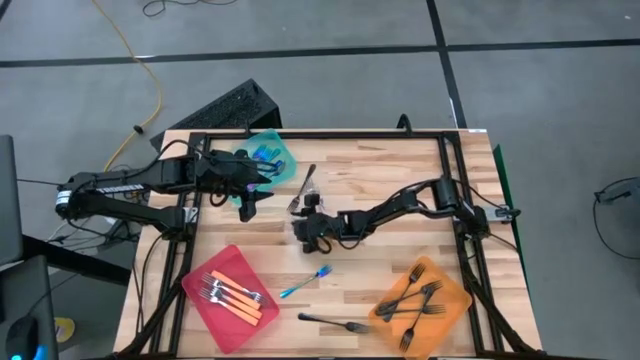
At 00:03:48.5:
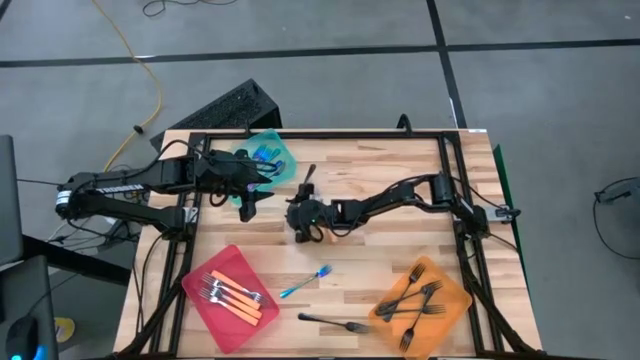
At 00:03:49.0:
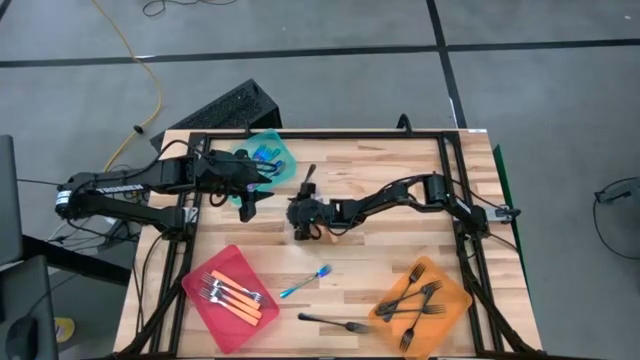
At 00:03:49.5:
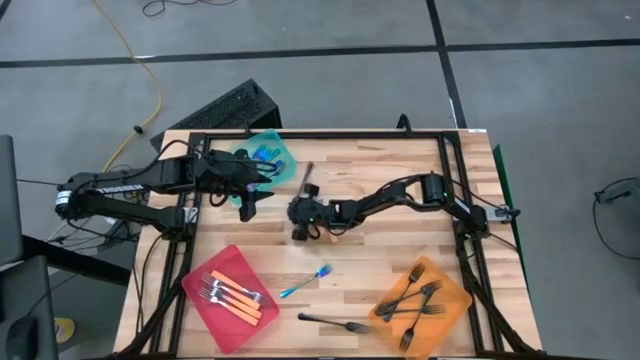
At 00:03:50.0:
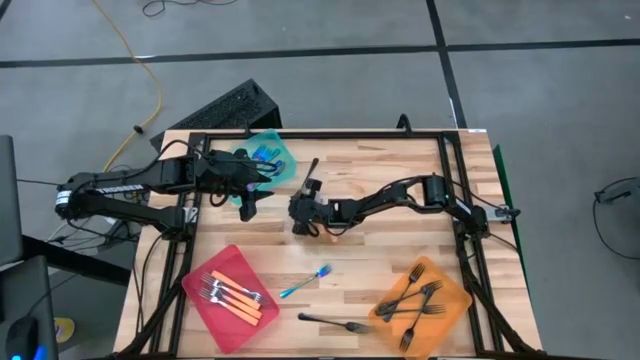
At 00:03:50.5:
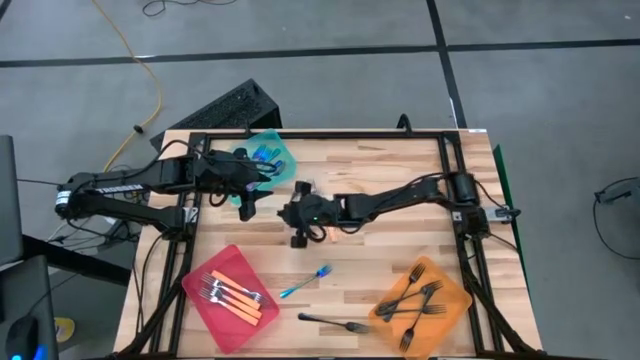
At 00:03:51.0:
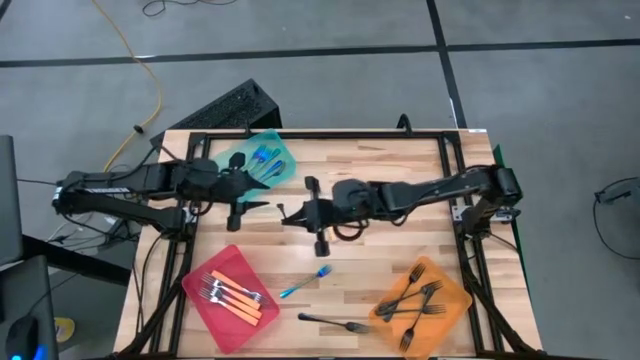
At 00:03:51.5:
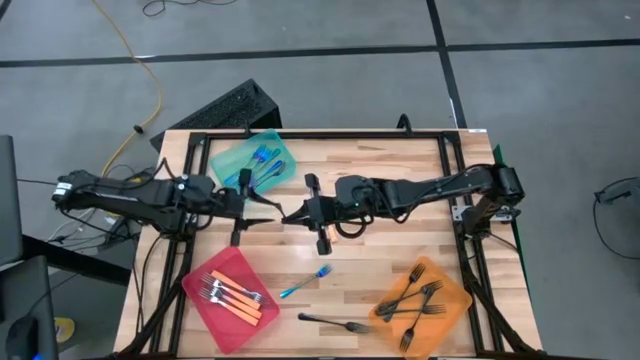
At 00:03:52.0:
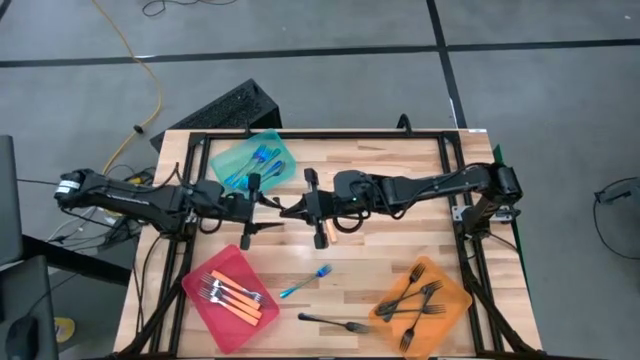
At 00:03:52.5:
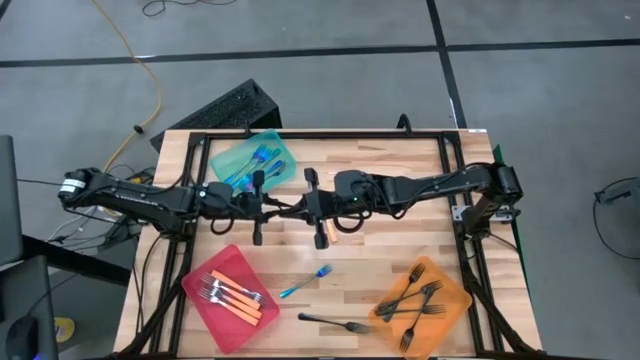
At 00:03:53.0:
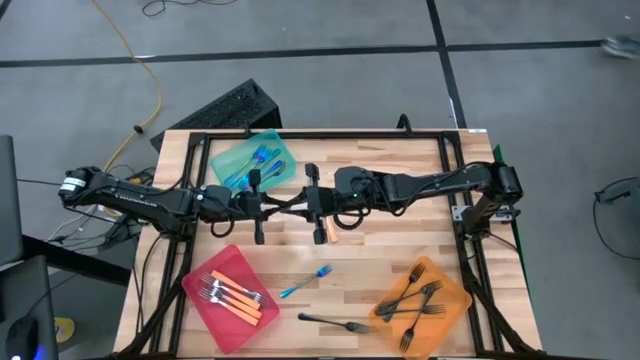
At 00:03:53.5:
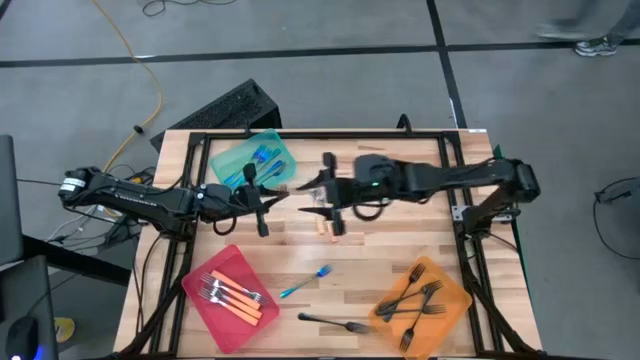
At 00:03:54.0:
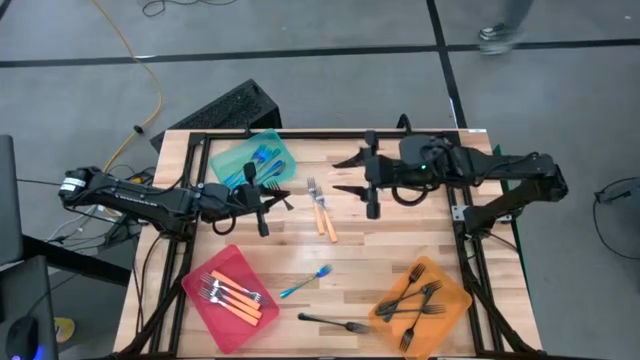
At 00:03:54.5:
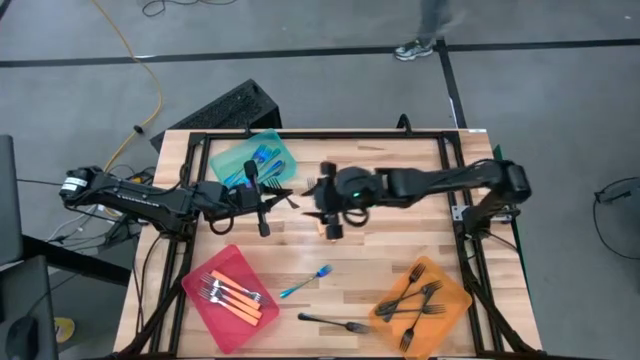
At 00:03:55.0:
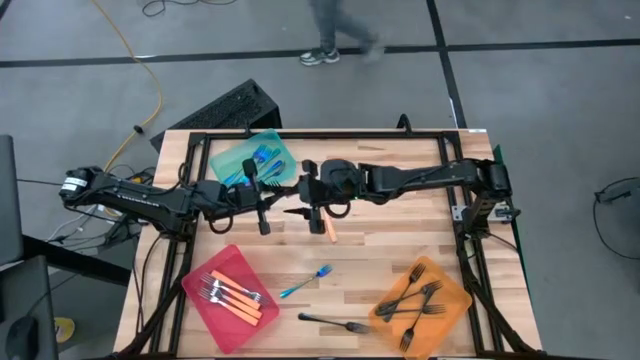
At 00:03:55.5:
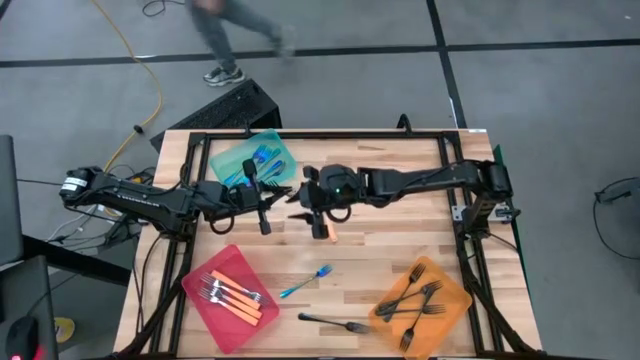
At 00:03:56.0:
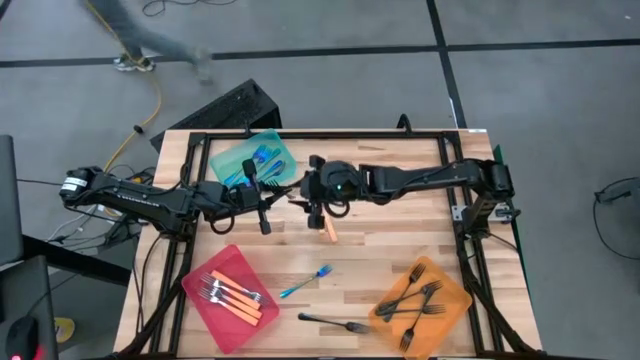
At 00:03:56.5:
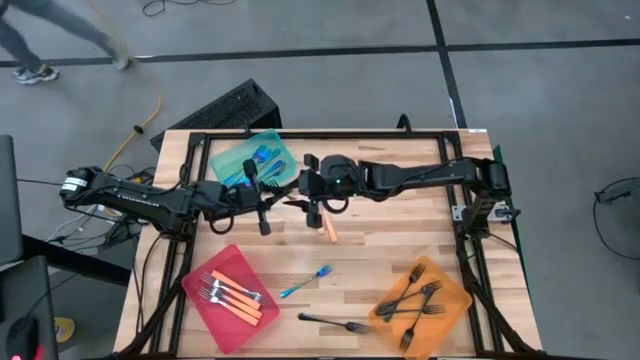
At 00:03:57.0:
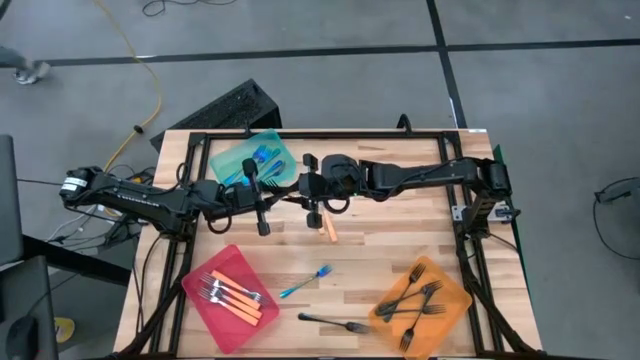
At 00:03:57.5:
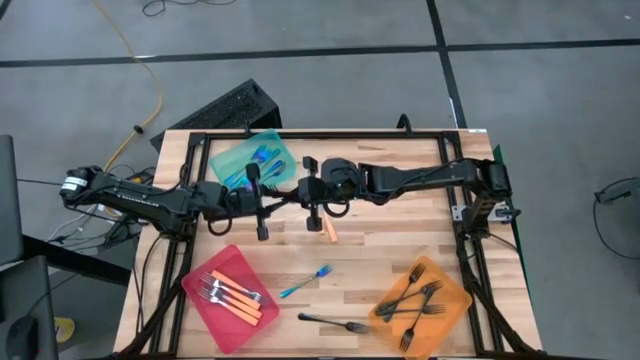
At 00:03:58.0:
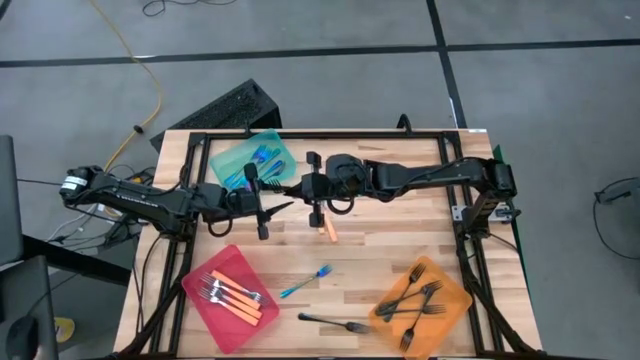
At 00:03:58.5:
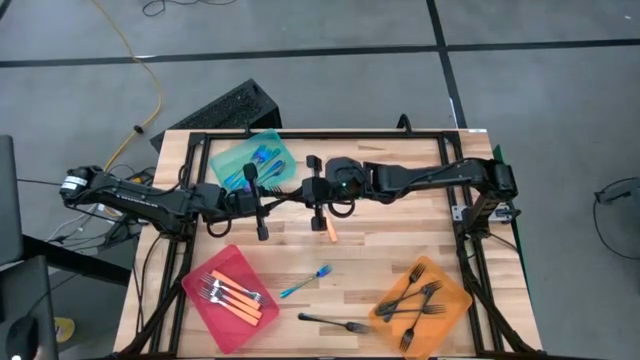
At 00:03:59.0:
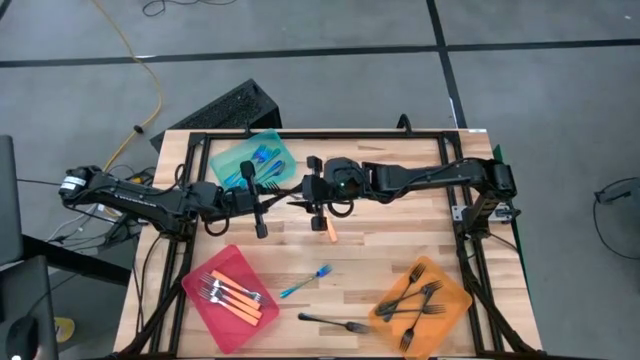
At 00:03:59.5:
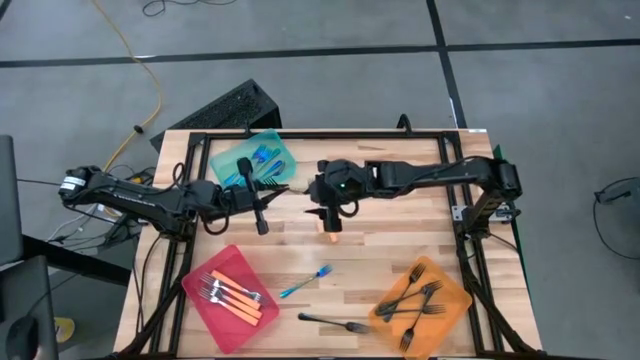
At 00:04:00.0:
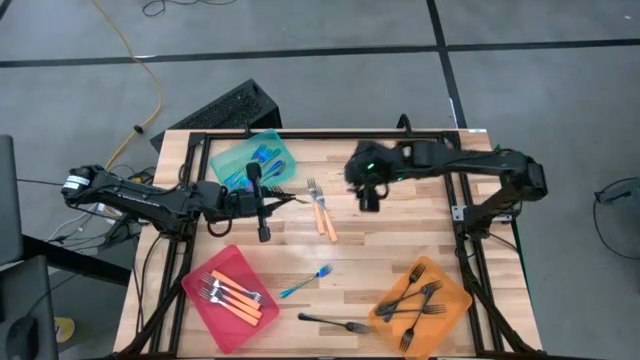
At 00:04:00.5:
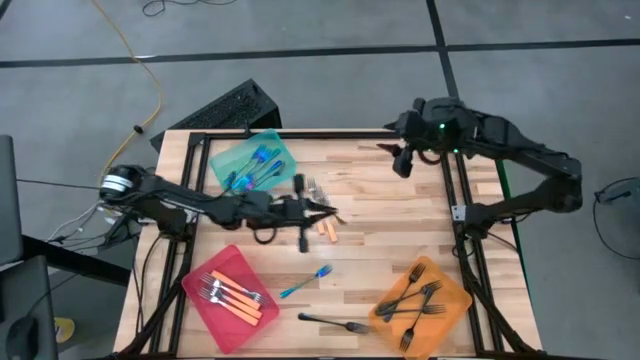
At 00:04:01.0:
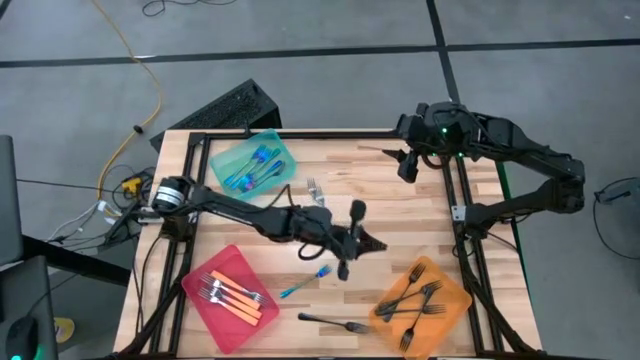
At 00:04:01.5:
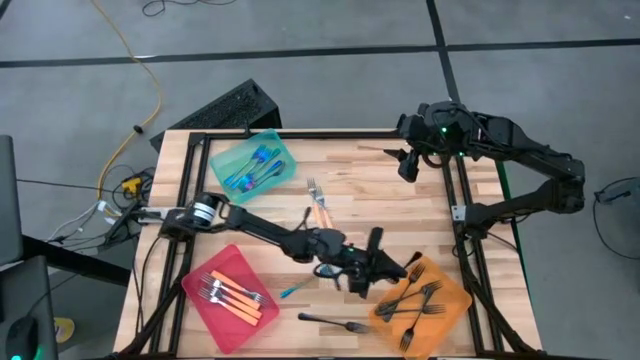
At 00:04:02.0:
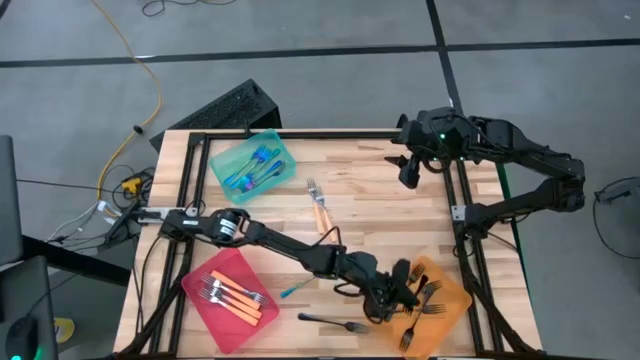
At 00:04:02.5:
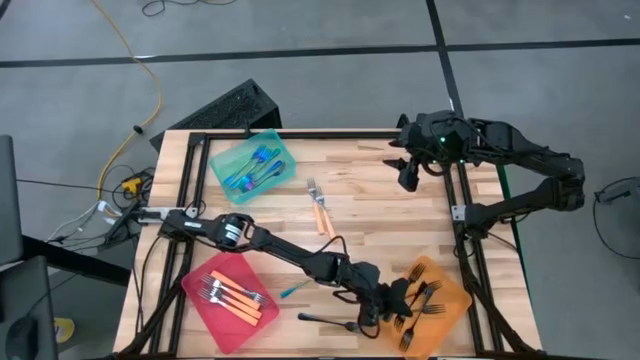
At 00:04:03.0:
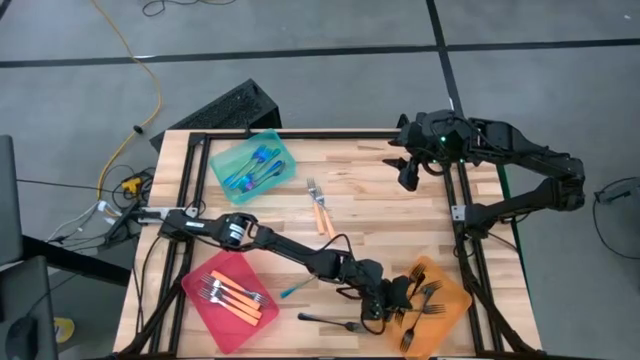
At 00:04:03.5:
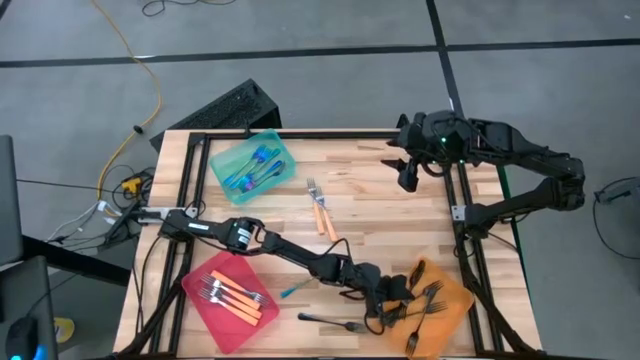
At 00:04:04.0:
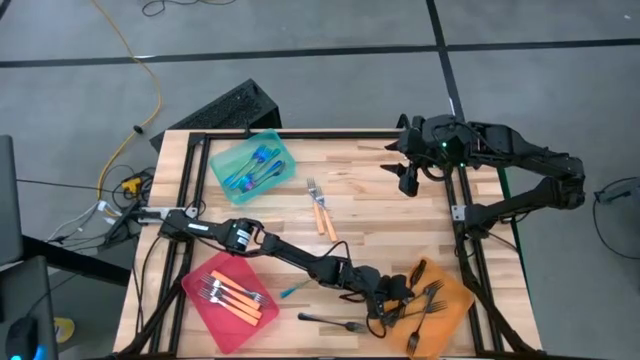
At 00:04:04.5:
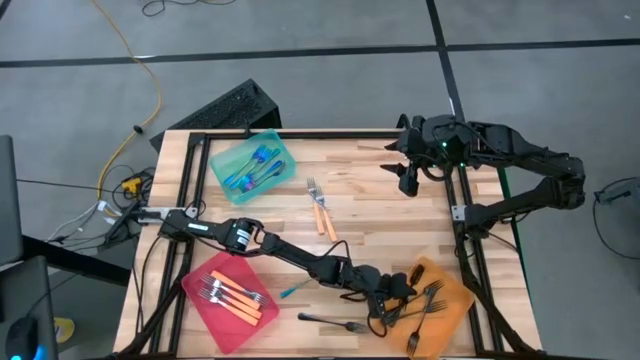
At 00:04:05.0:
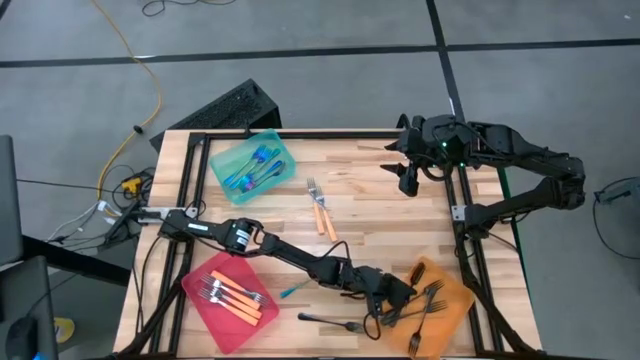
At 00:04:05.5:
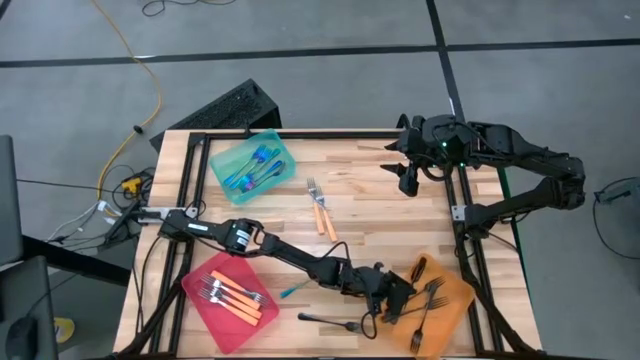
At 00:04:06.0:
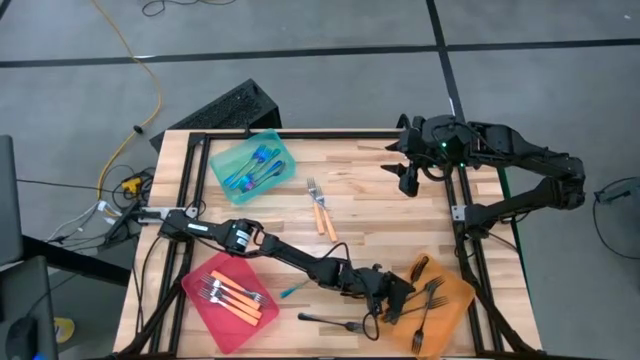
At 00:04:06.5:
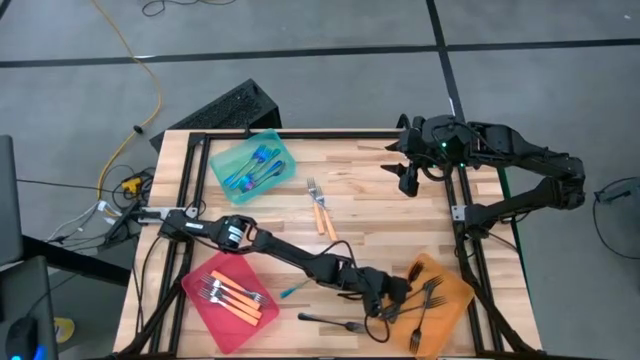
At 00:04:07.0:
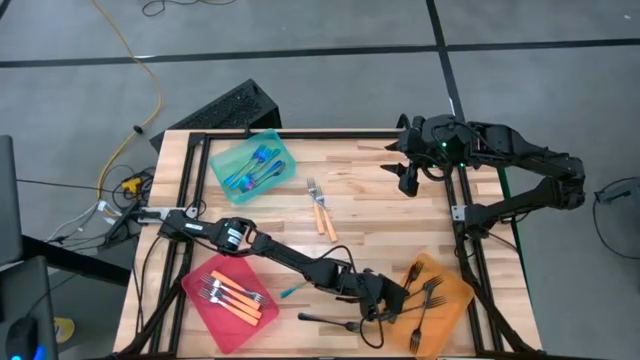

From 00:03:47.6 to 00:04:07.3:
Task: Sort silverware by color (type)
Put the black fork into the orange bin
